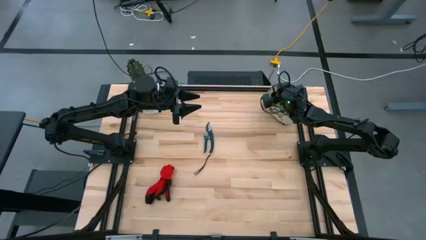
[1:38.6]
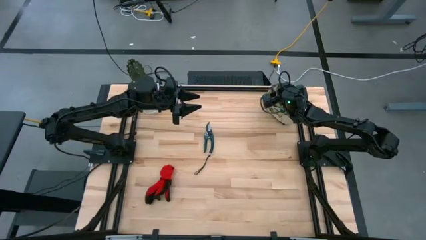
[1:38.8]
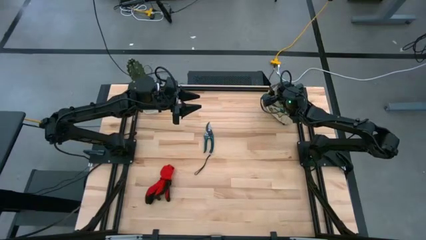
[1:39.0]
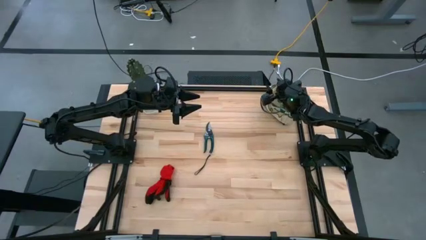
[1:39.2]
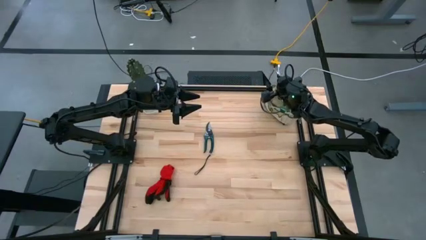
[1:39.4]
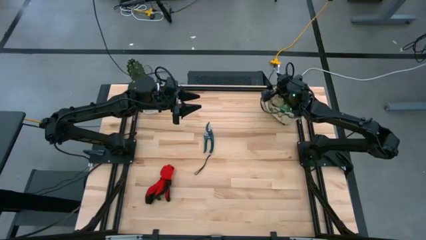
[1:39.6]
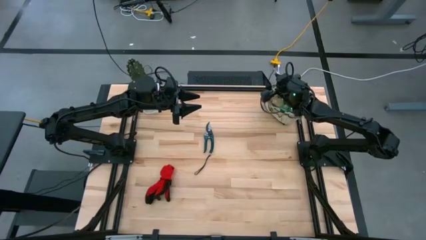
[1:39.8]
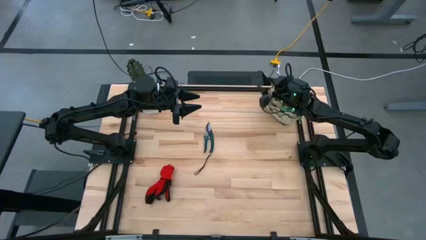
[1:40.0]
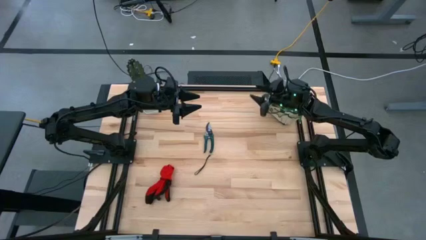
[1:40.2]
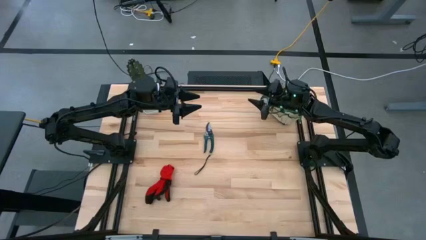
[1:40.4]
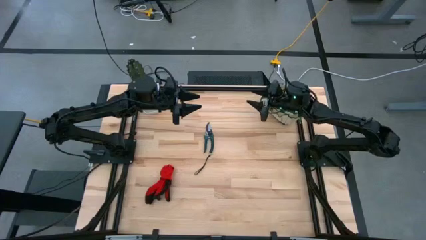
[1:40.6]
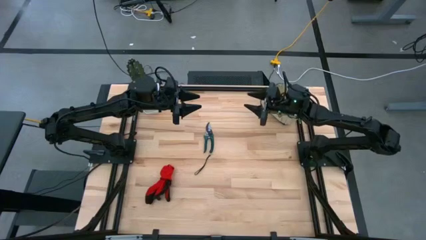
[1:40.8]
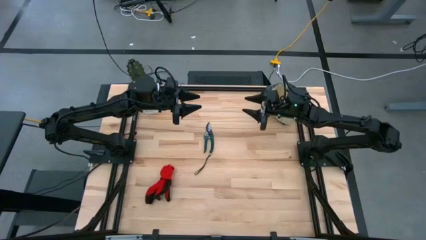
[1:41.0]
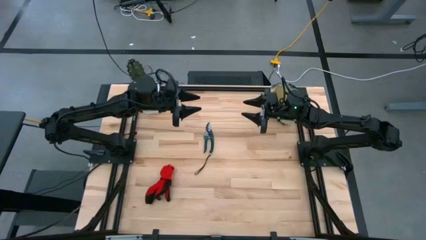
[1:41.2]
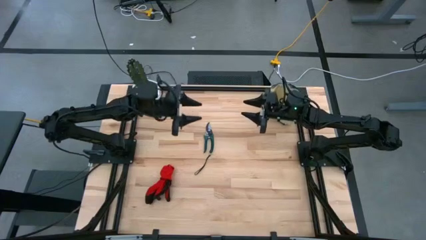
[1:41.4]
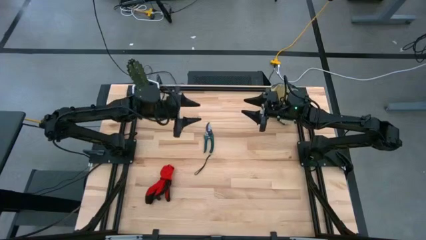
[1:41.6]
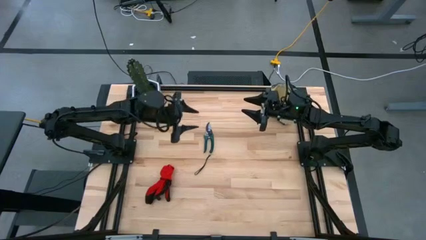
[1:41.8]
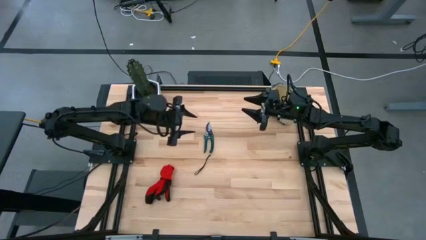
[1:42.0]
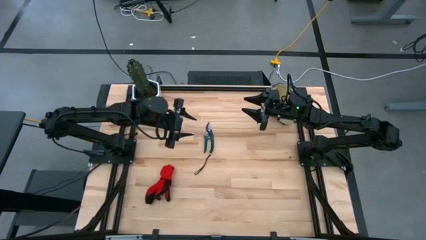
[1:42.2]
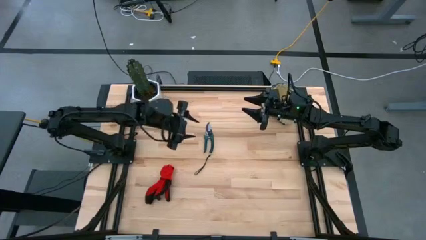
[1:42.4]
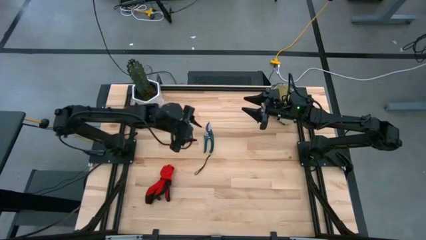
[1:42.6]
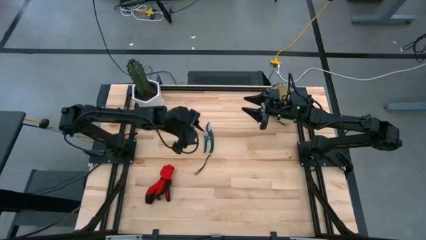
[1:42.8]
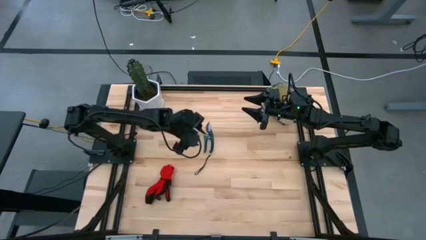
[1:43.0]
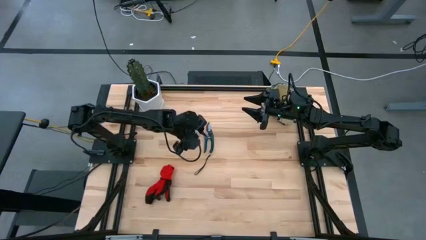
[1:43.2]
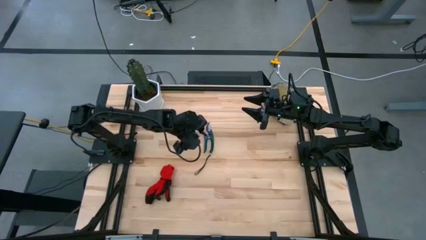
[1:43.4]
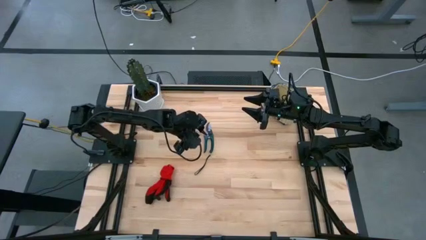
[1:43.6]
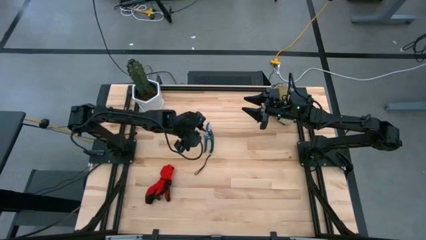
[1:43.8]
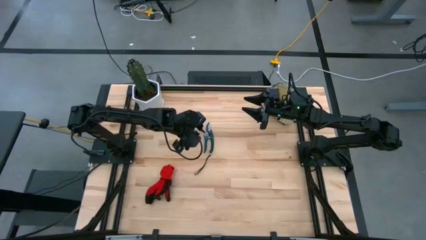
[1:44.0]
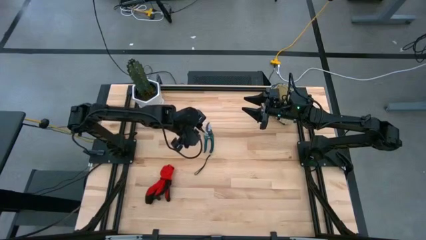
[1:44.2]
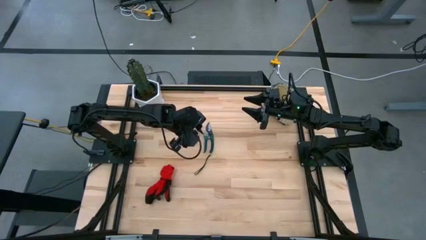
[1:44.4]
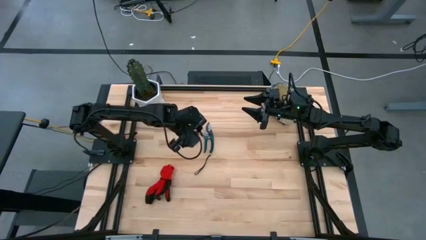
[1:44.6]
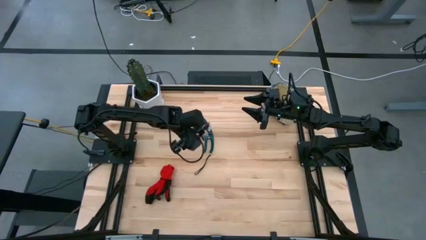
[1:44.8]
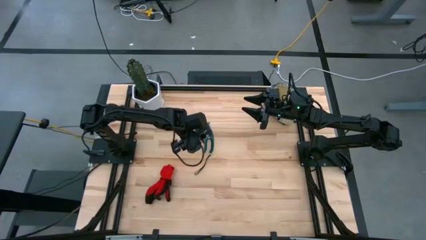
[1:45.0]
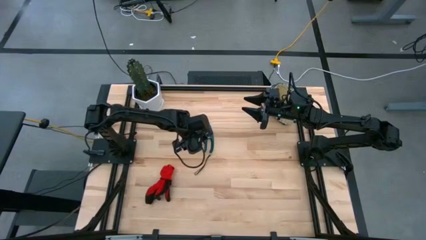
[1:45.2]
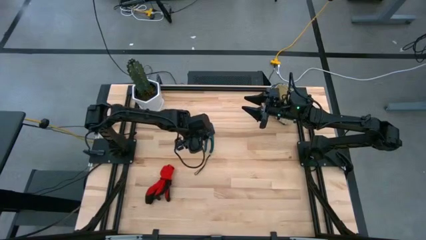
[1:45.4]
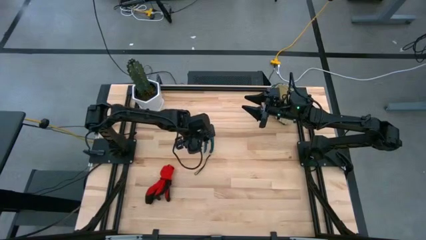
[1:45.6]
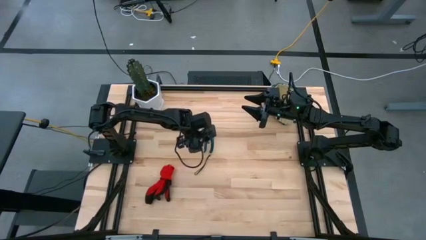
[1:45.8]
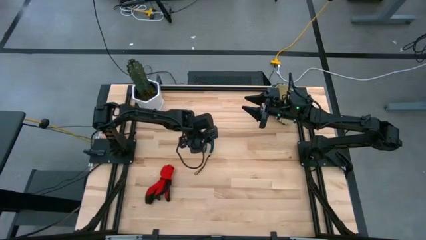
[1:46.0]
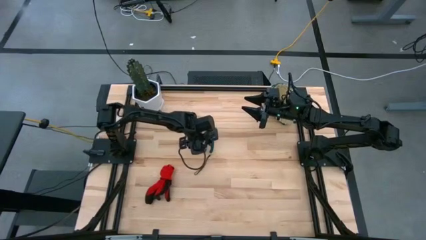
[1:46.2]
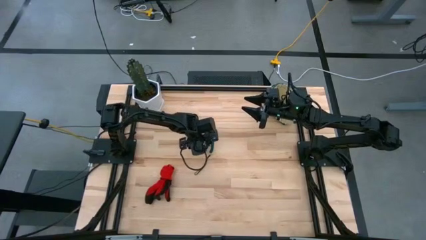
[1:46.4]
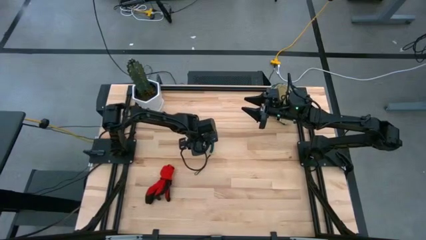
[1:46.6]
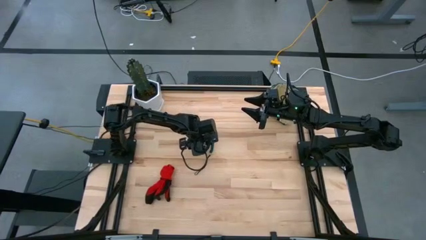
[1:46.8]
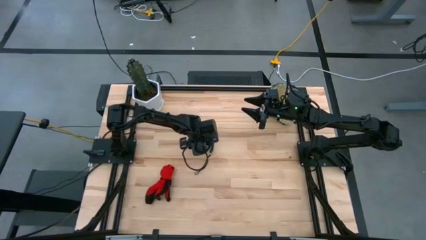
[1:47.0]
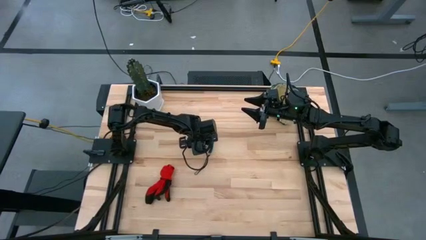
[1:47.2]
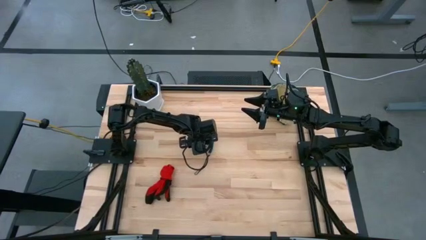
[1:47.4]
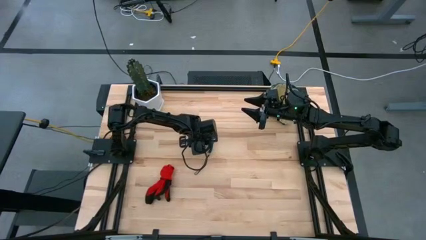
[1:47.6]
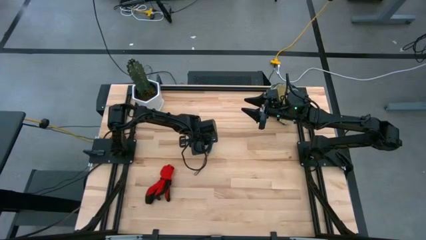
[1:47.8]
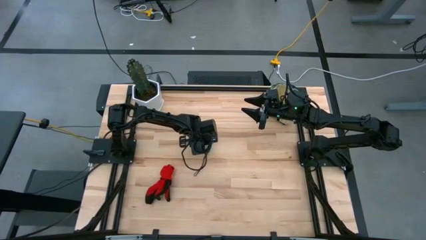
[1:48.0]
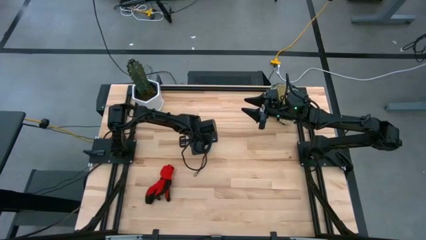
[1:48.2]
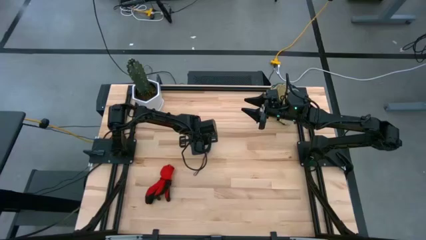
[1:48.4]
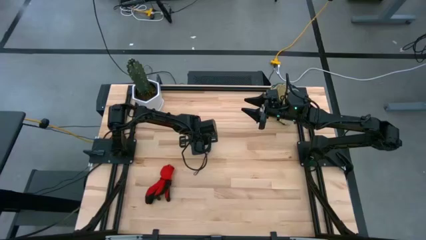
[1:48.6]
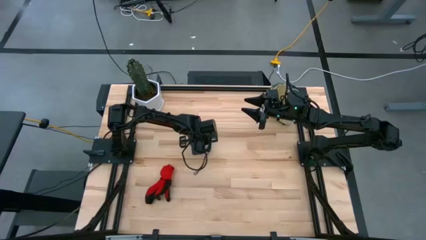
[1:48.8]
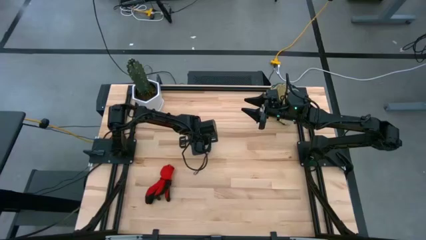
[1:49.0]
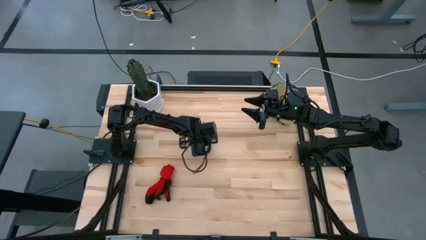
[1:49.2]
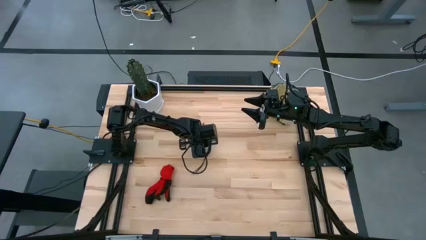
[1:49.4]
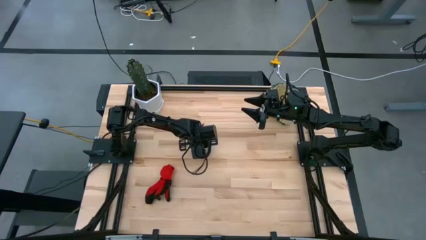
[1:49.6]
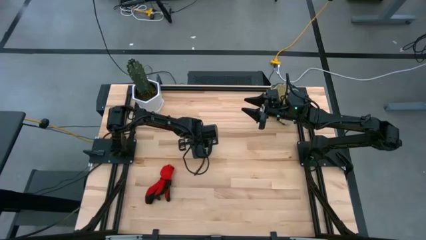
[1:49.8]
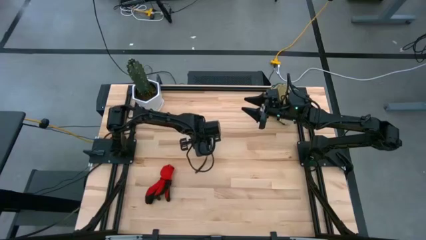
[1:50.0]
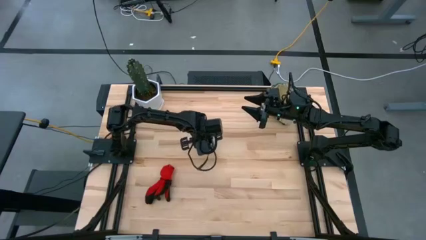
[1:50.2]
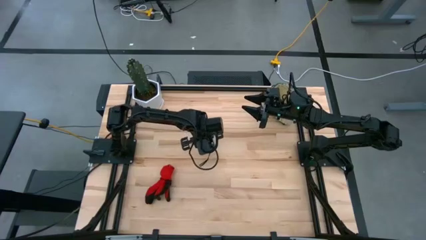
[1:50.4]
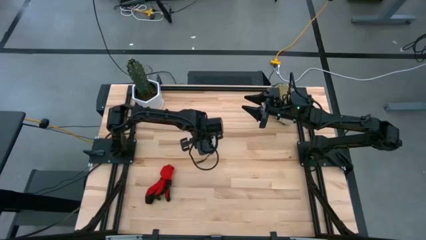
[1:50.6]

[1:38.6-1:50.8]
Task: Pick & Place Garden tools in Gardening bag
Put the green shear scissors into the white gardening bag

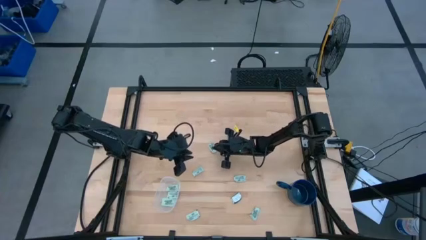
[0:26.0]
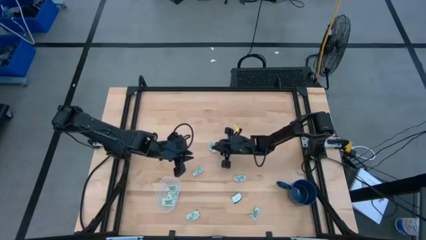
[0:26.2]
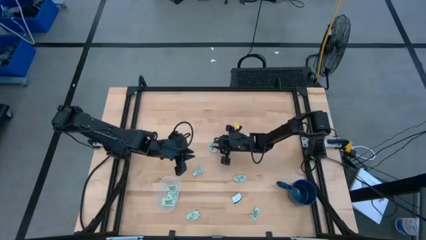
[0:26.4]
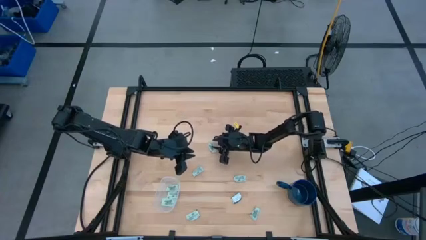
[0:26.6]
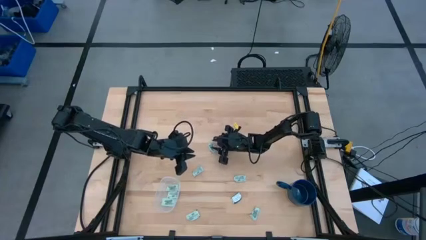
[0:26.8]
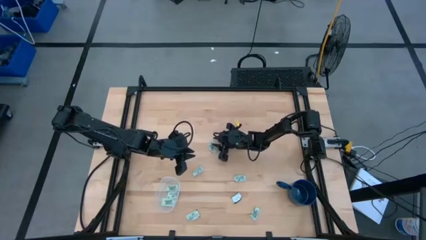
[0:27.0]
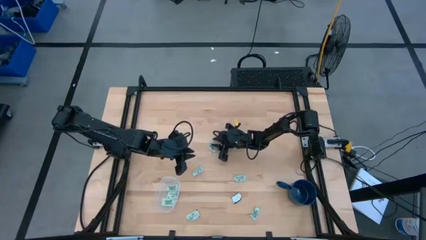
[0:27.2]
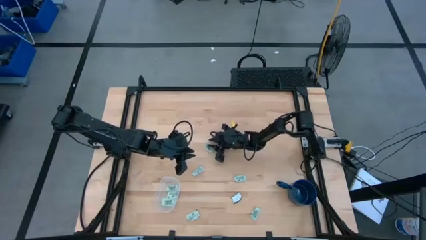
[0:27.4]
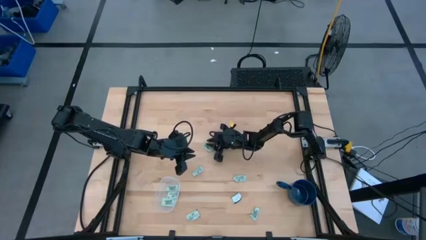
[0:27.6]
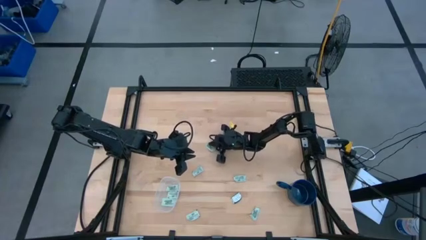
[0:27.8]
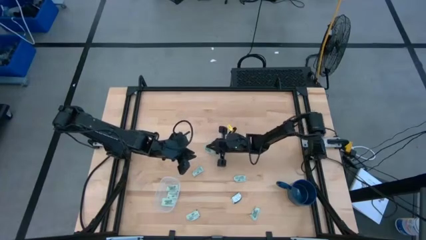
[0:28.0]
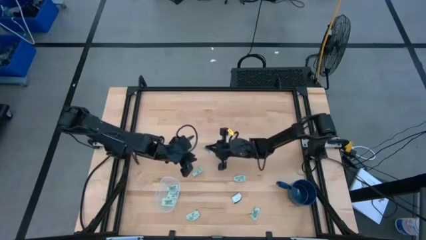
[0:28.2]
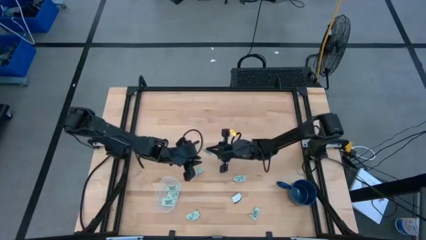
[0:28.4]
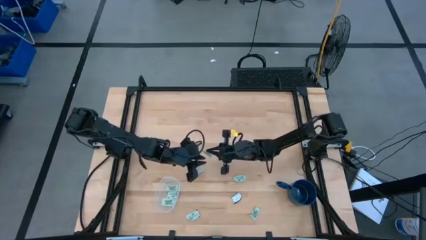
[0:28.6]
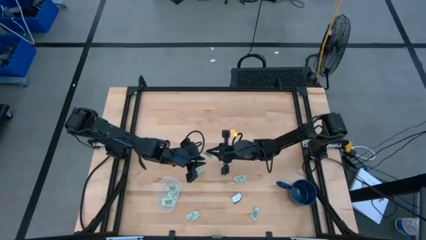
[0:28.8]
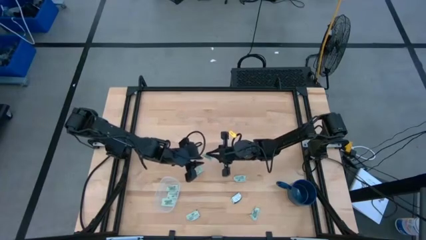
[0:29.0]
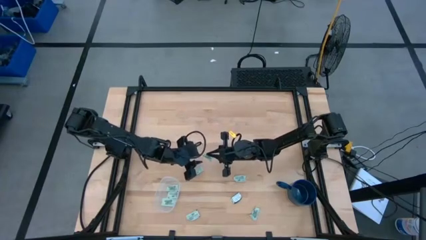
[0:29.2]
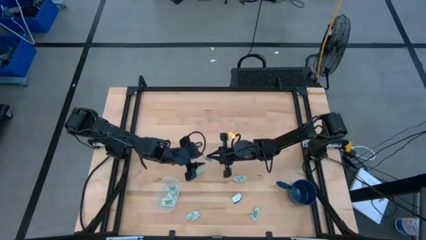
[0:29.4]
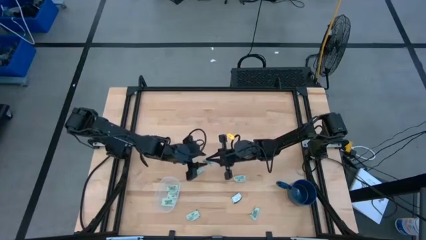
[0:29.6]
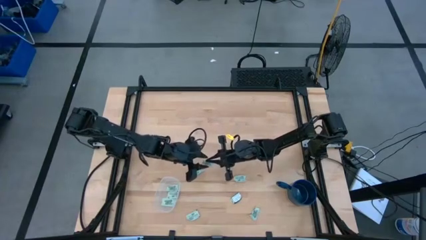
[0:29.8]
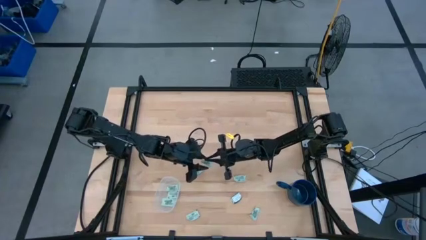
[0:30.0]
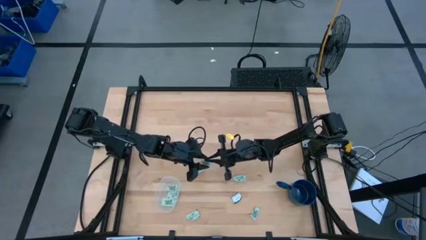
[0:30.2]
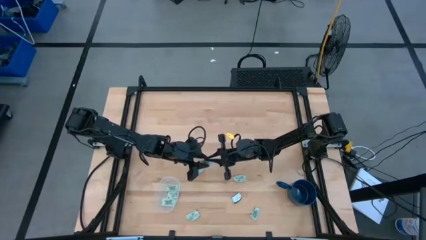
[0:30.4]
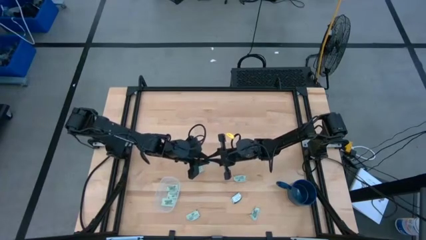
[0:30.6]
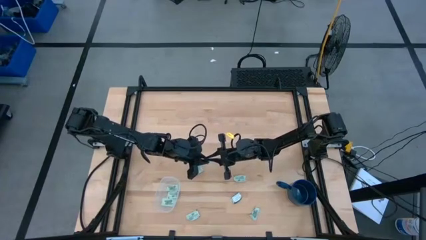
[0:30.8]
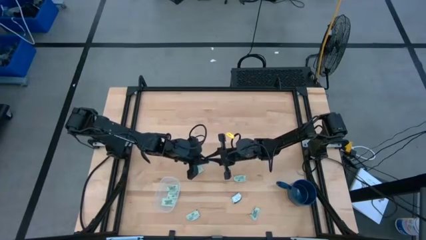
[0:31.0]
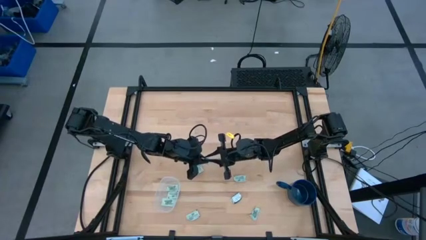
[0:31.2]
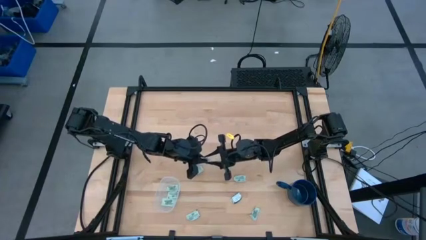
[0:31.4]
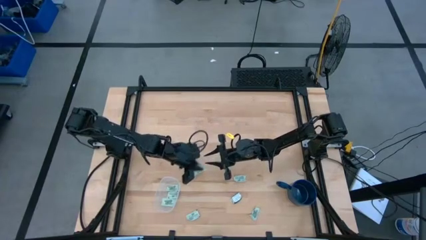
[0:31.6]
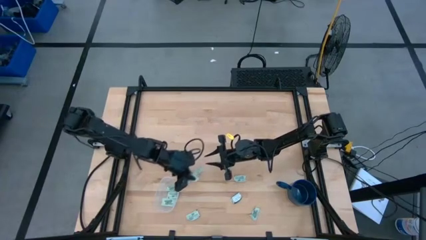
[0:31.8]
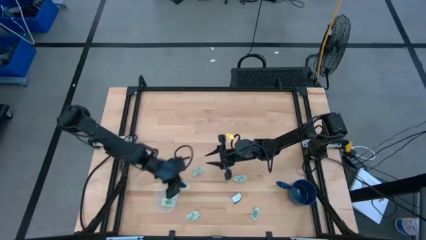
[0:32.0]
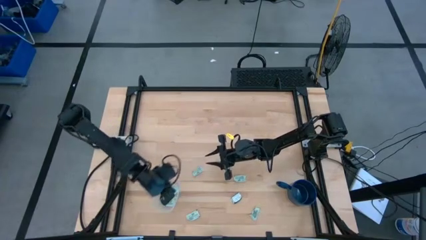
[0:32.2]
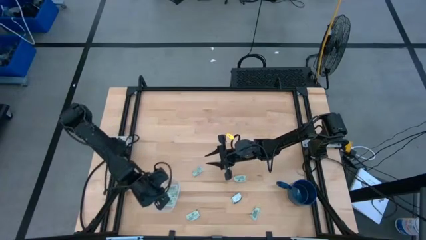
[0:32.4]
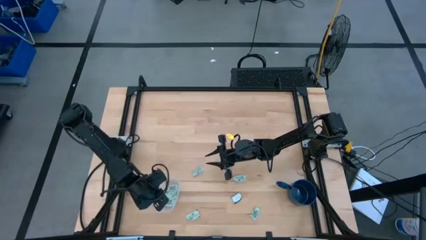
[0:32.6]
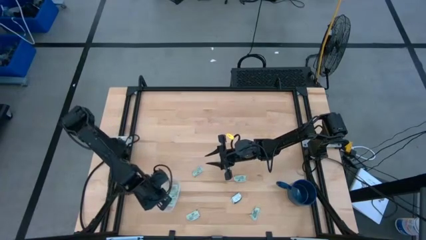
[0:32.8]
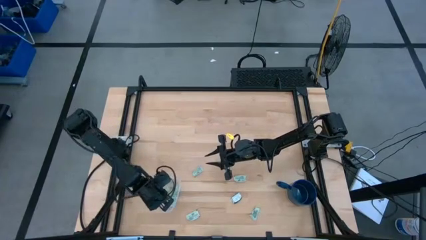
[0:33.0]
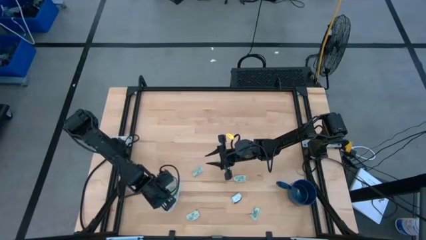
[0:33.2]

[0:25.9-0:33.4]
Task: Pick and place Stevia / Truvia into bins
Put the stevia packet into the transparent container
